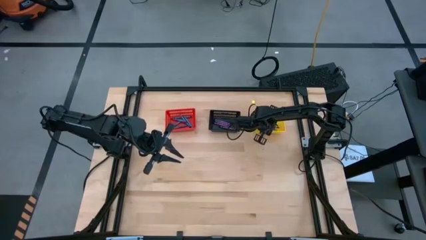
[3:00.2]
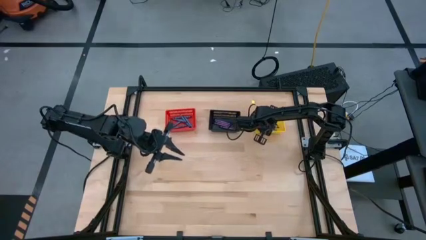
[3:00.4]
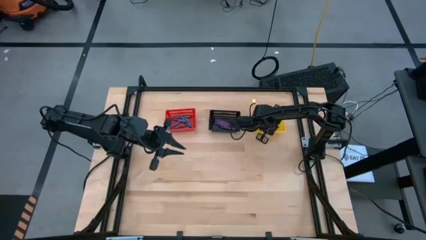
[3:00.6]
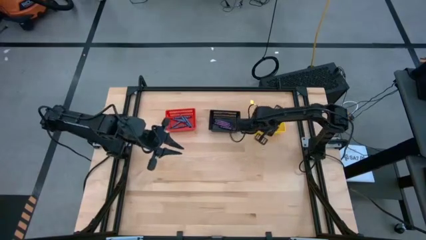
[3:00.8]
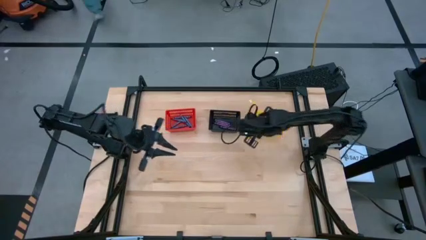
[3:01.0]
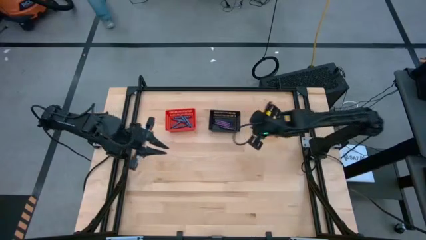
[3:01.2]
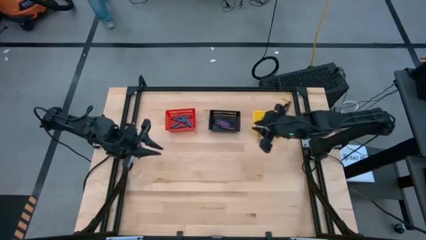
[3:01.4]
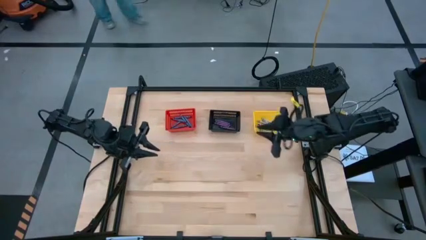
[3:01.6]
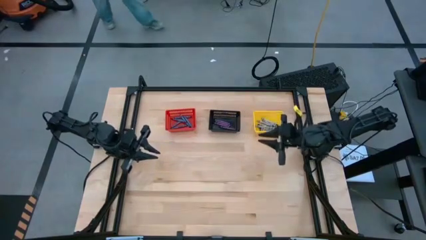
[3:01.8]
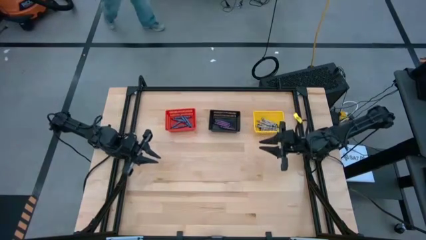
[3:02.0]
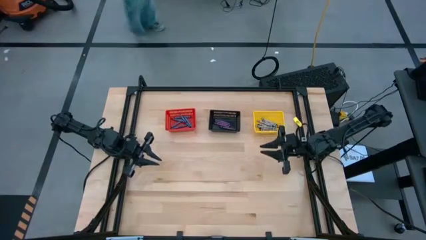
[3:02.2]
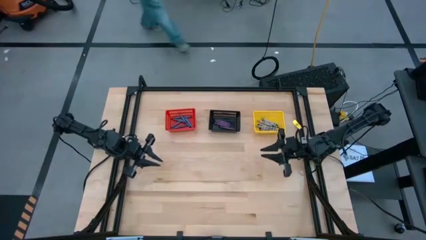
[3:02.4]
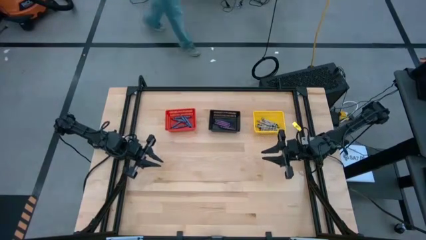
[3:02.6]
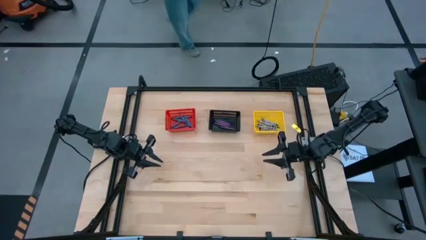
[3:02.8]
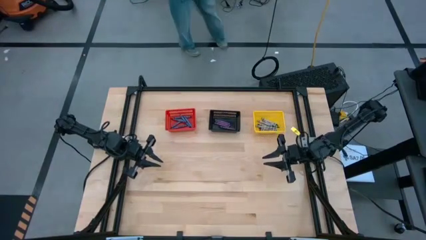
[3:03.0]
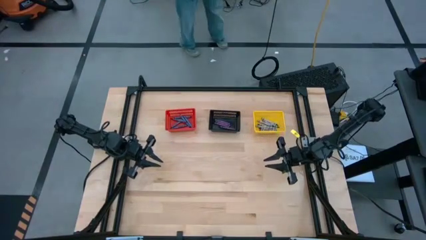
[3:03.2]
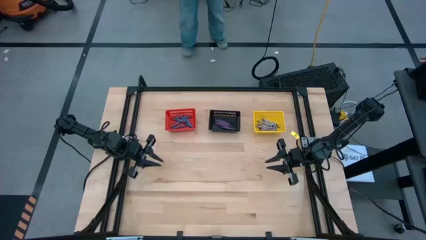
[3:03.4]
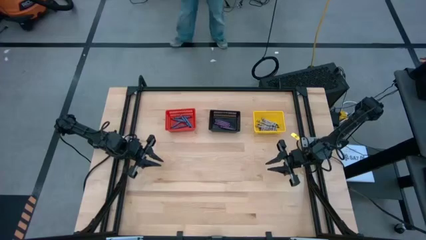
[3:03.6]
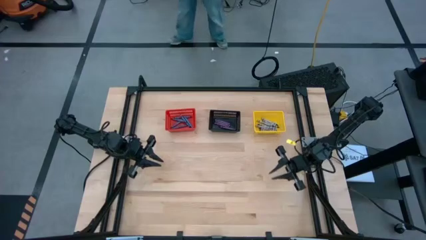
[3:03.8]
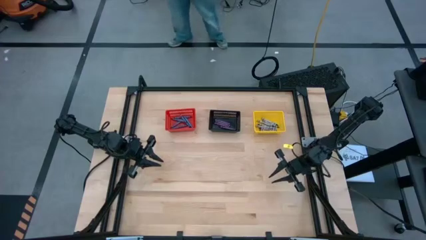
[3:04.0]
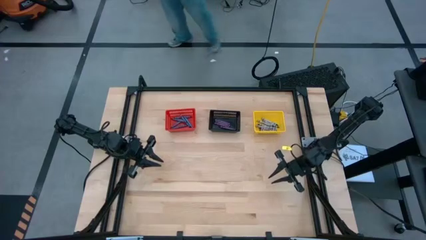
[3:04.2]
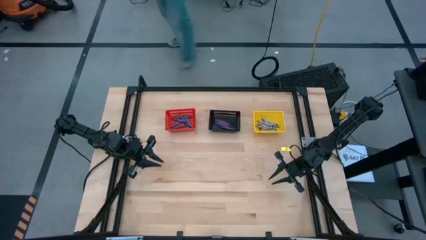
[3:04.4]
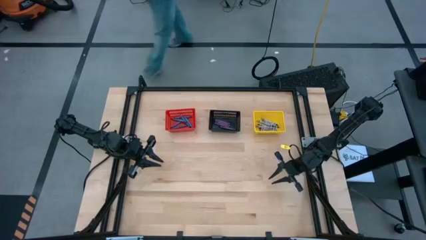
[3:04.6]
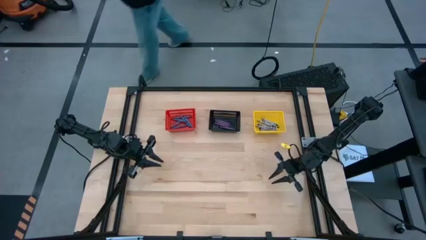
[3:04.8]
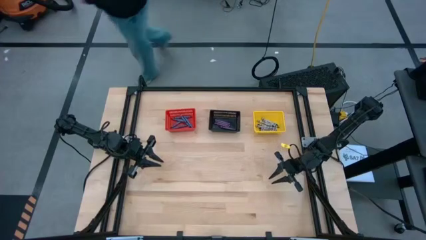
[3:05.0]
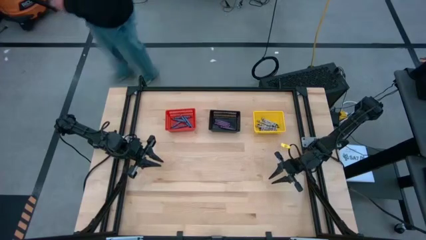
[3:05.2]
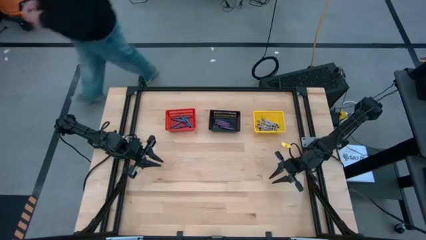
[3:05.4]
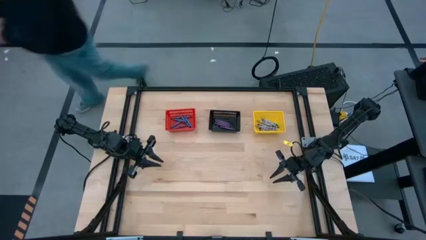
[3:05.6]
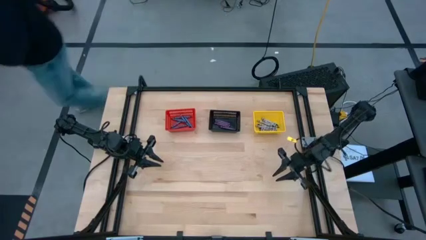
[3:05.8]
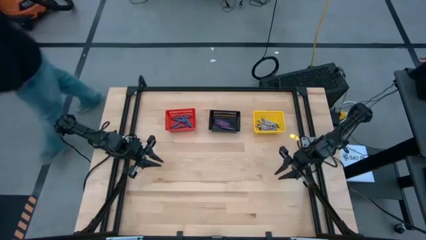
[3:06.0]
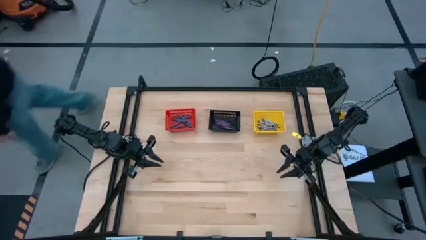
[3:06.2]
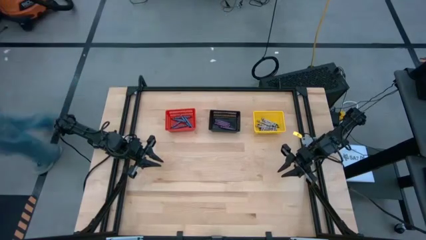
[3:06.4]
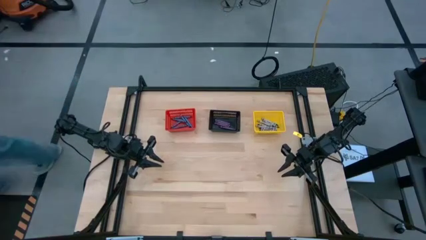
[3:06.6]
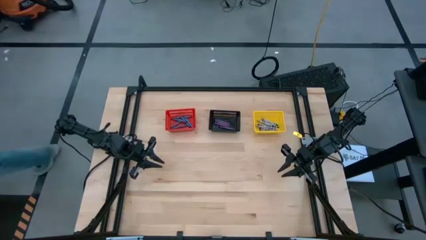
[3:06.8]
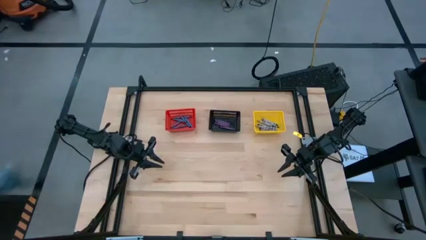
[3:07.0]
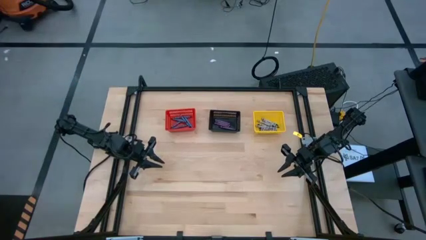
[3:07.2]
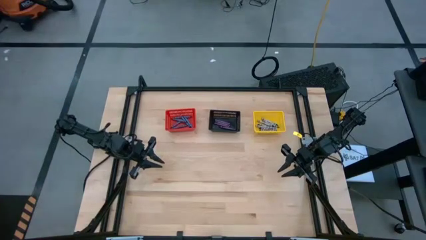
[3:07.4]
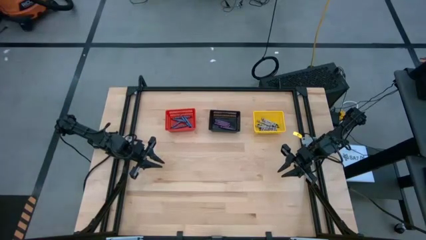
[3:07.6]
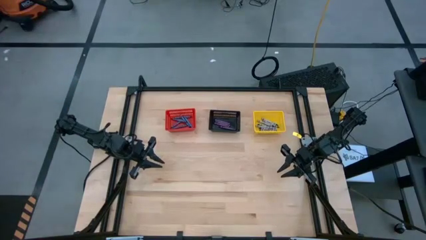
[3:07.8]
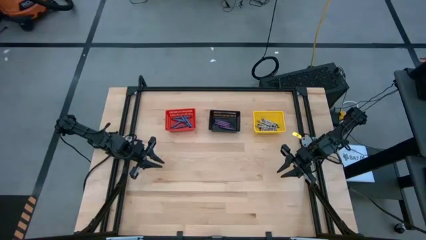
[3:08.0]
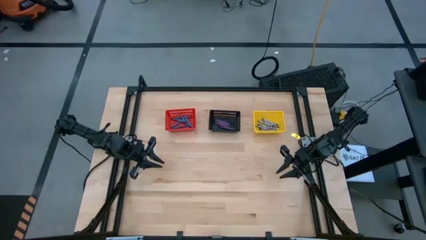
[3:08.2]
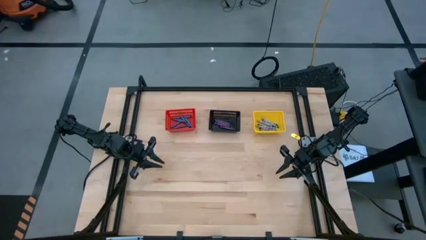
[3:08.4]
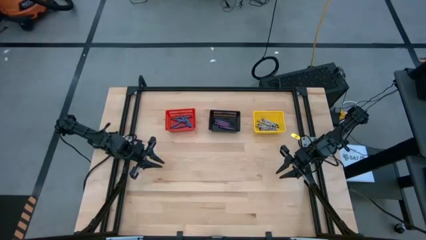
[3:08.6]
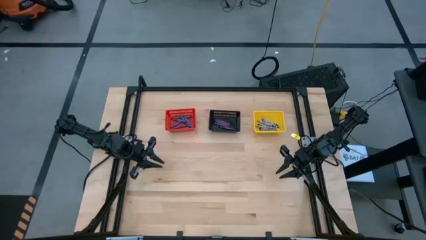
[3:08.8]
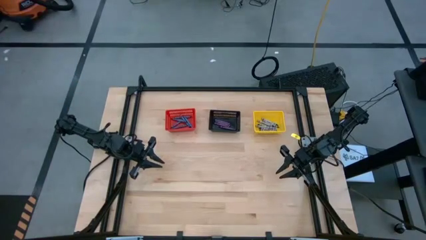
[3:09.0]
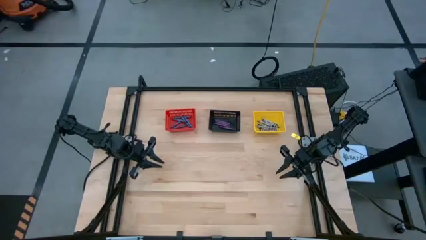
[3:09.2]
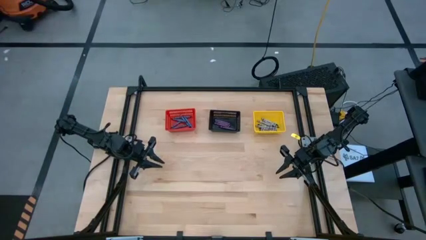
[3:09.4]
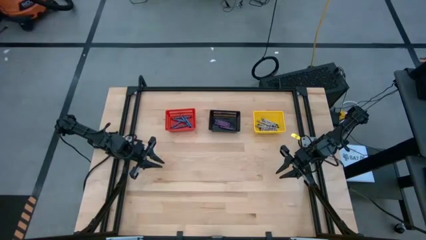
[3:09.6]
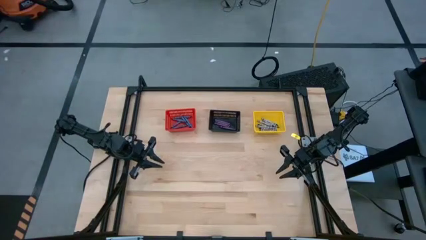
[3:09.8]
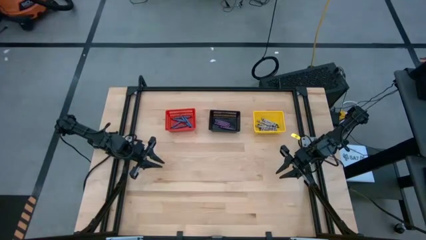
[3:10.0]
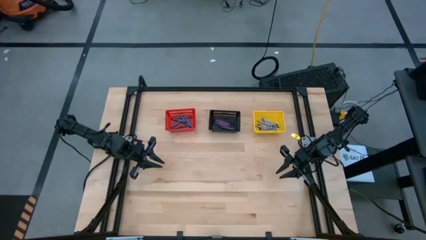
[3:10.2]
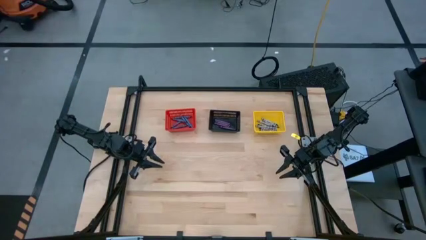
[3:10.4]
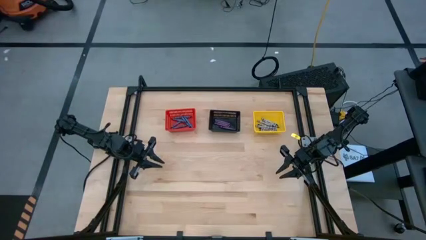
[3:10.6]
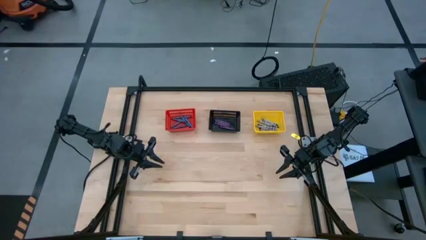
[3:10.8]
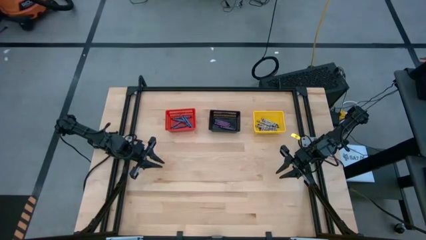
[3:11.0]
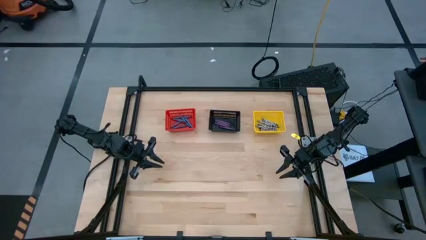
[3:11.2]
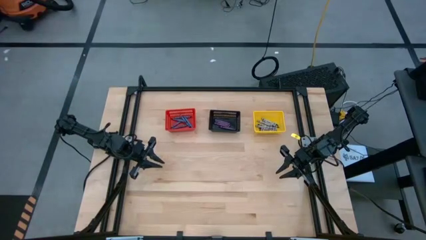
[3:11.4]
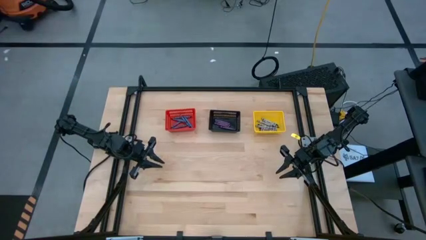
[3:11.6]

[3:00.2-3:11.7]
Task: Sort crayons
Return to Home Position

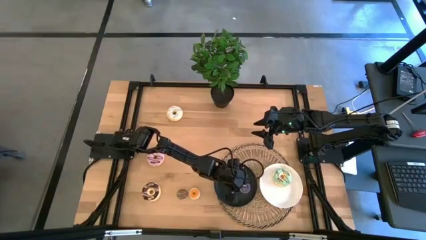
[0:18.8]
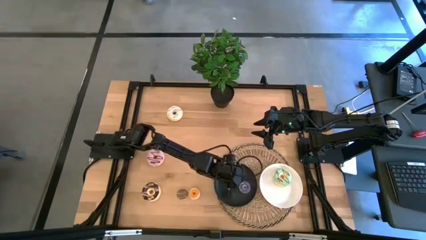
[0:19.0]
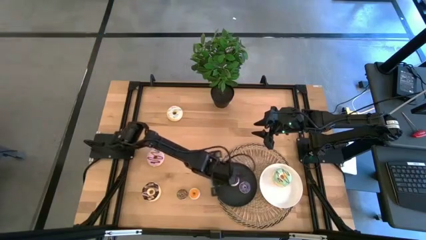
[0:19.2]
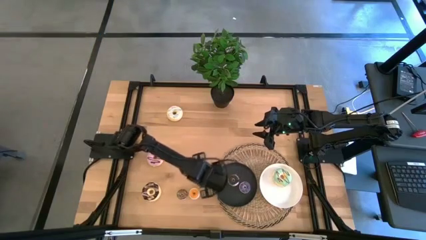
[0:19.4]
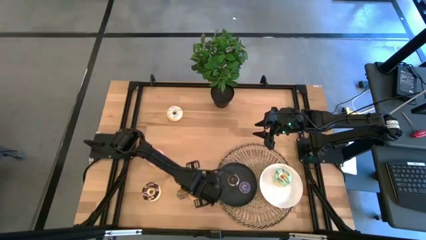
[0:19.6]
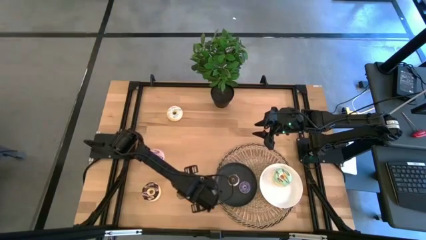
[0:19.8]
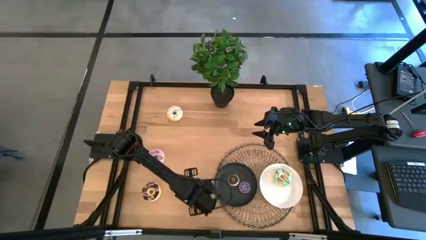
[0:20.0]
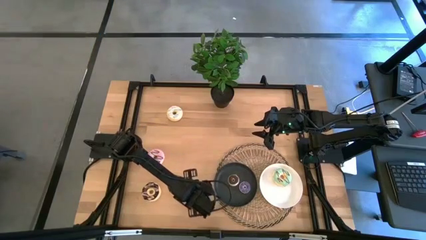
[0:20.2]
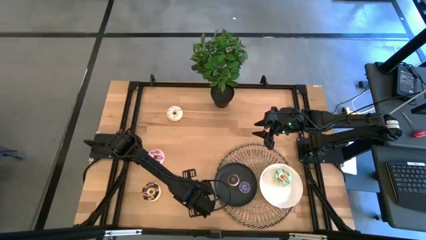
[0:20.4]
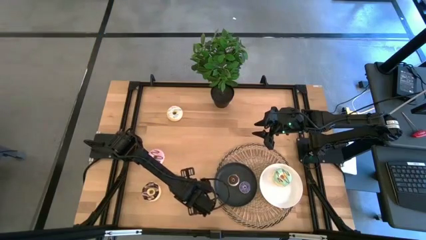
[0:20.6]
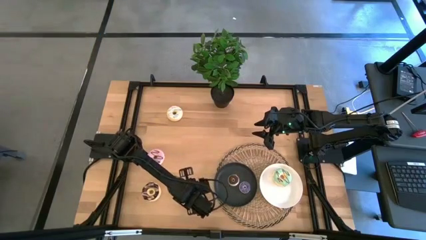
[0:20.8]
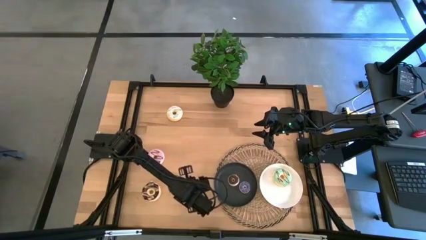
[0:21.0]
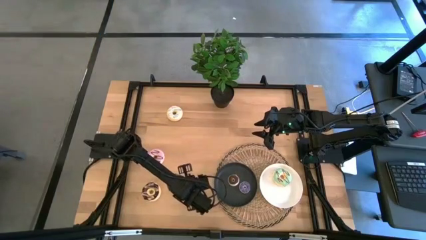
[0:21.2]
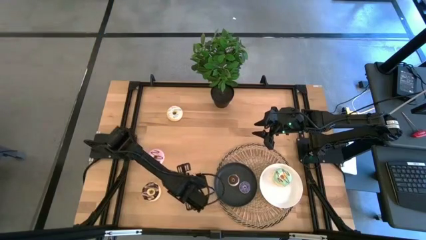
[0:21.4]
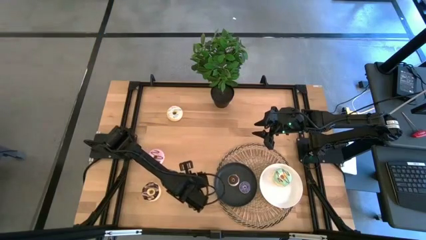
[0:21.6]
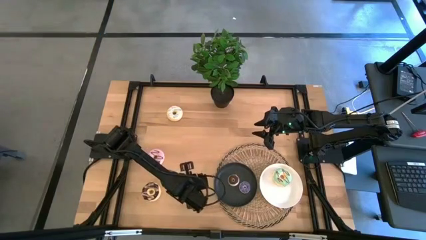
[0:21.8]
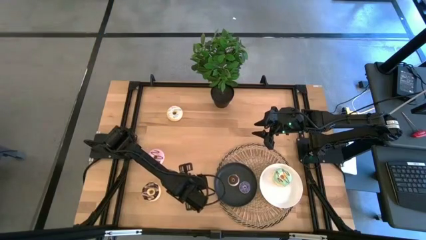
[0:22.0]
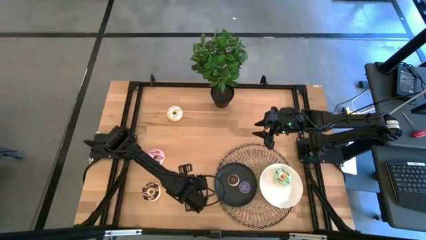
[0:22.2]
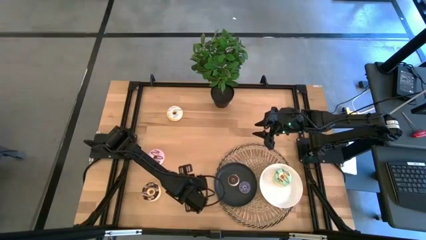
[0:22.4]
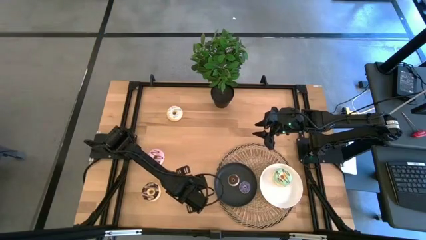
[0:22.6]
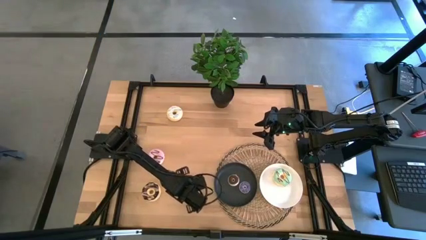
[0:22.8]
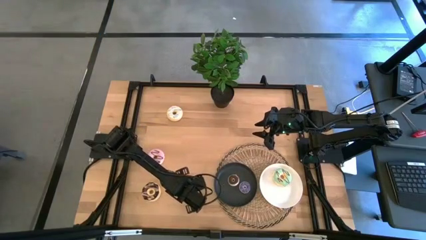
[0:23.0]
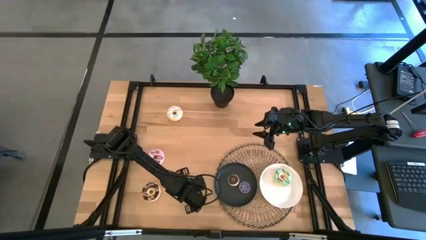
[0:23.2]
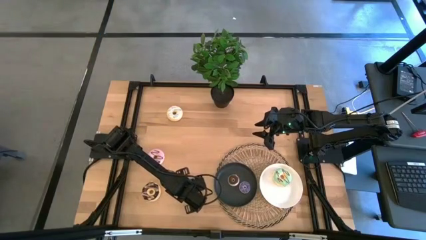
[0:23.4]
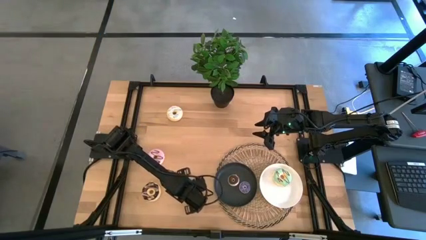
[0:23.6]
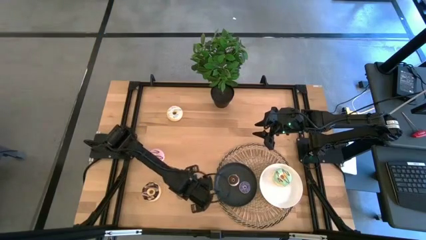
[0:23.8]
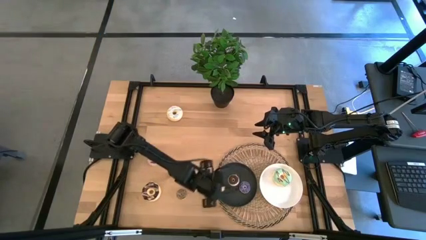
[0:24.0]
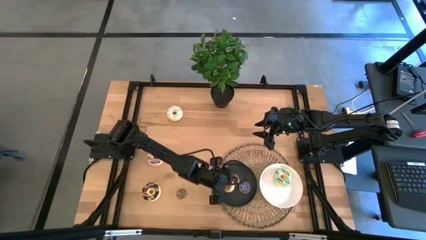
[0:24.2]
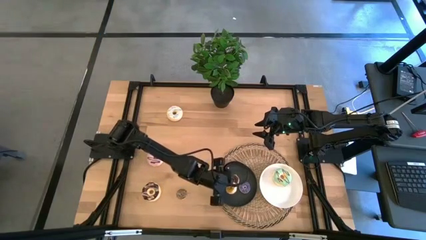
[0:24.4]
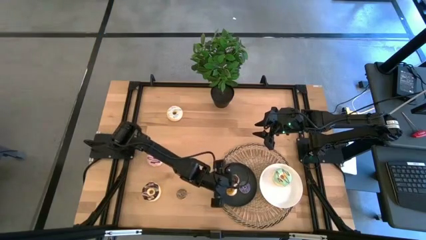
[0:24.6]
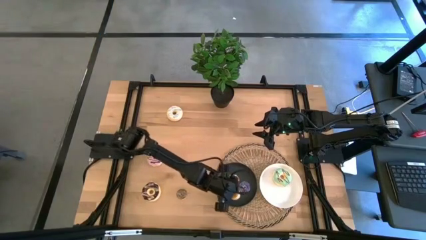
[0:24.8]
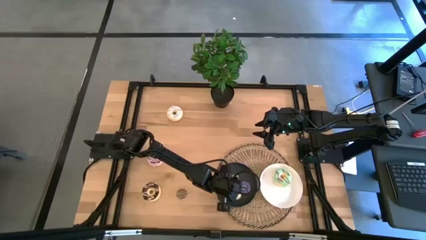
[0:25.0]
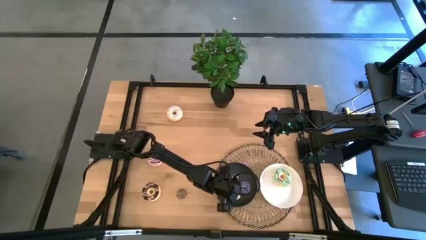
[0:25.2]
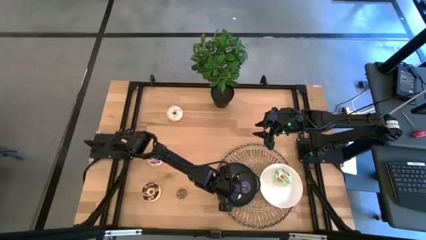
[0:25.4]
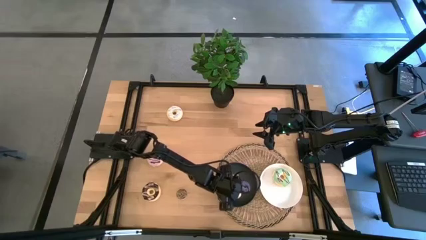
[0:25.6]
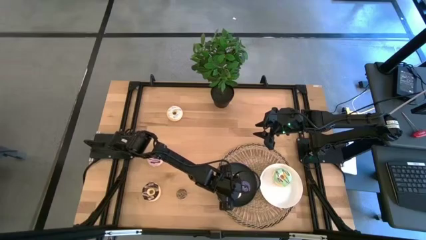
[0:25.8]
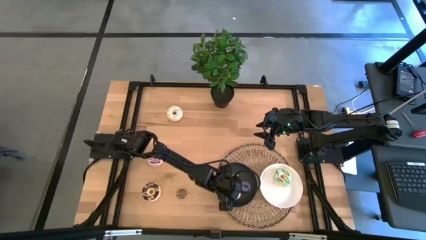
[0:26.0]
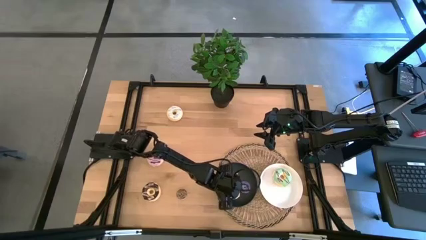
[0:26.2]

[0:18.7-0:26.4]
Task: Pick & Place donuts
Put the small orange donut on the black plate
